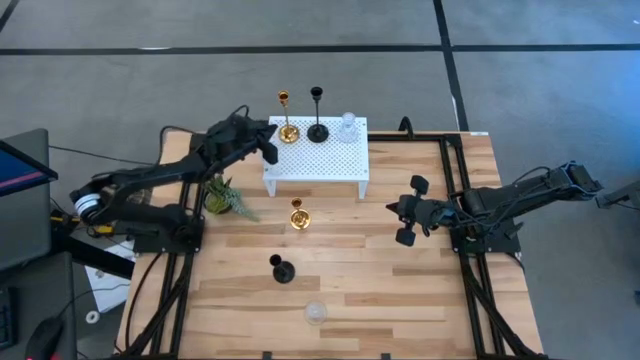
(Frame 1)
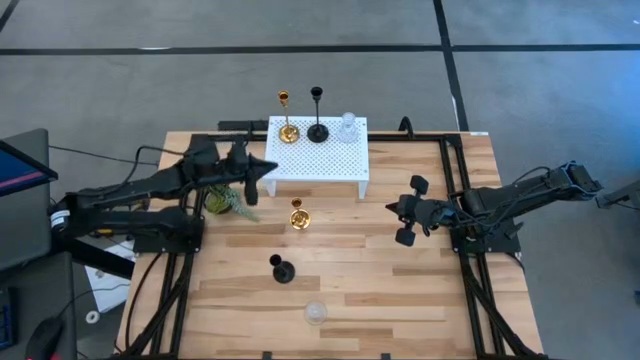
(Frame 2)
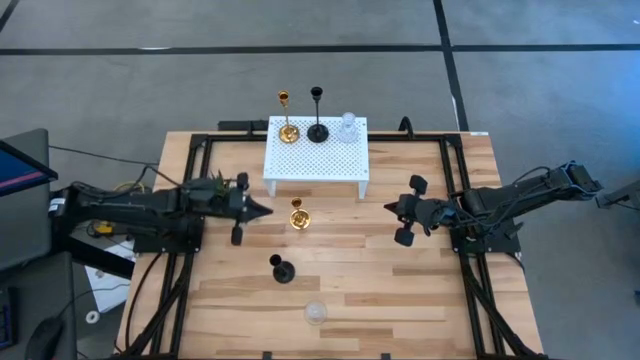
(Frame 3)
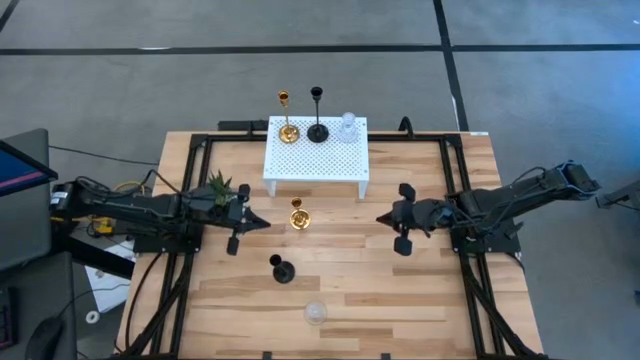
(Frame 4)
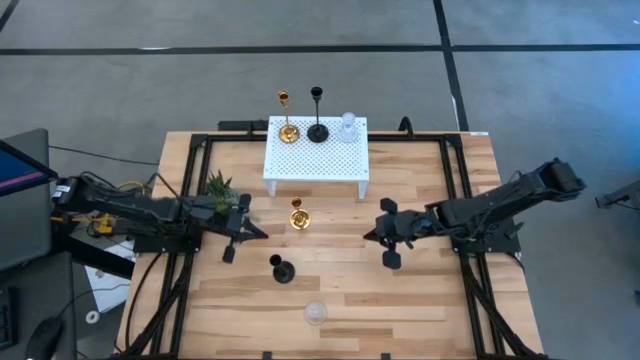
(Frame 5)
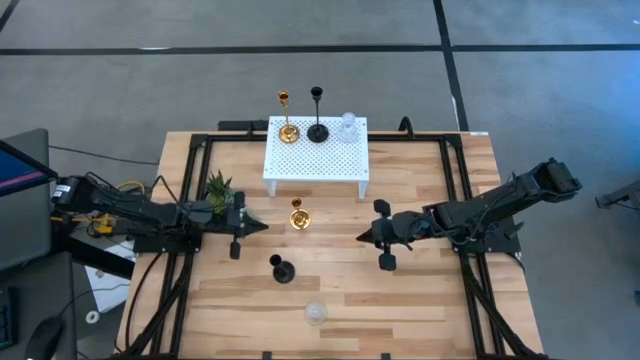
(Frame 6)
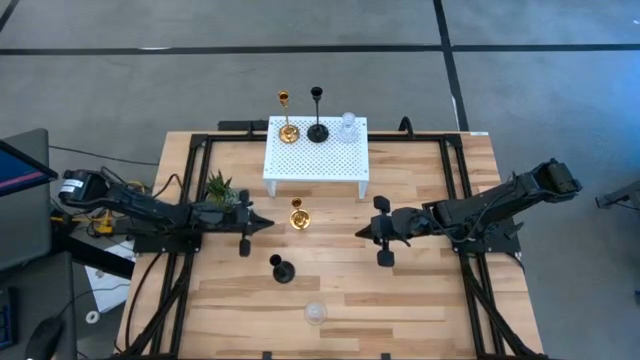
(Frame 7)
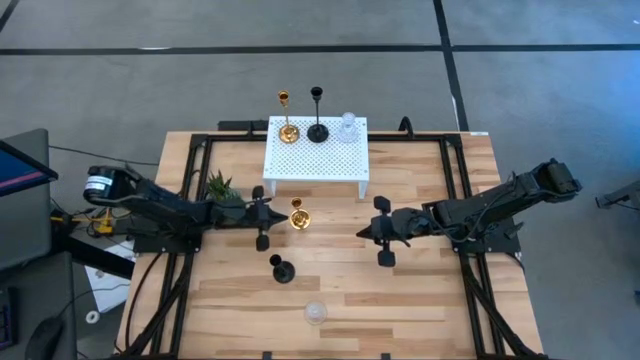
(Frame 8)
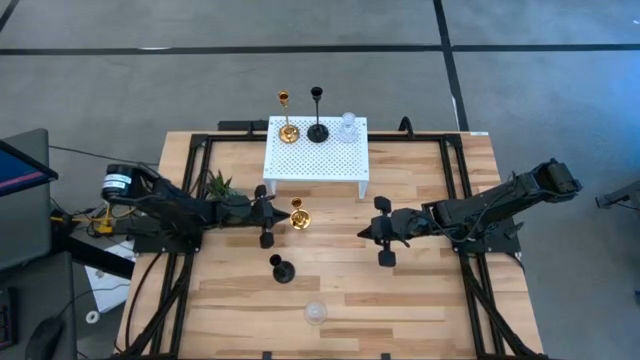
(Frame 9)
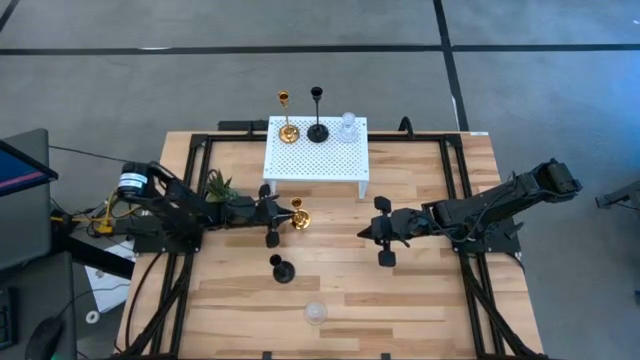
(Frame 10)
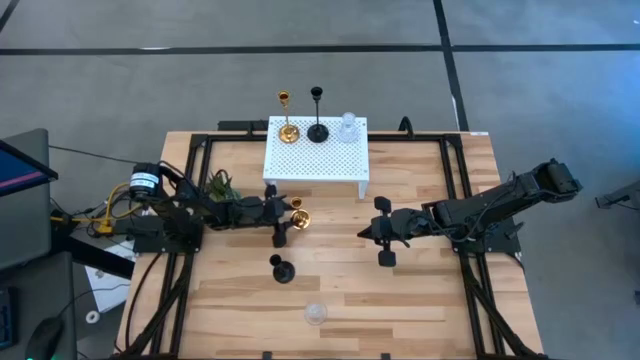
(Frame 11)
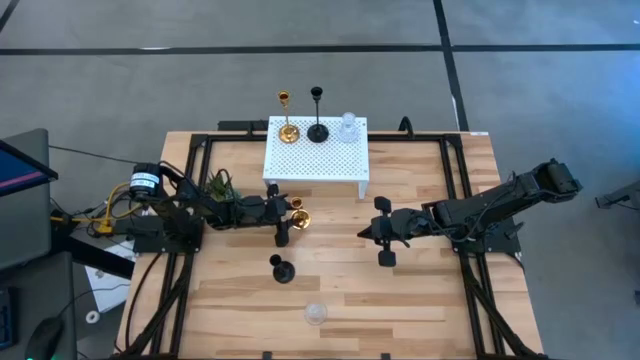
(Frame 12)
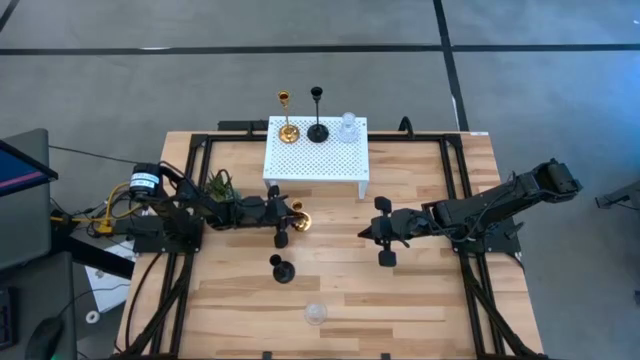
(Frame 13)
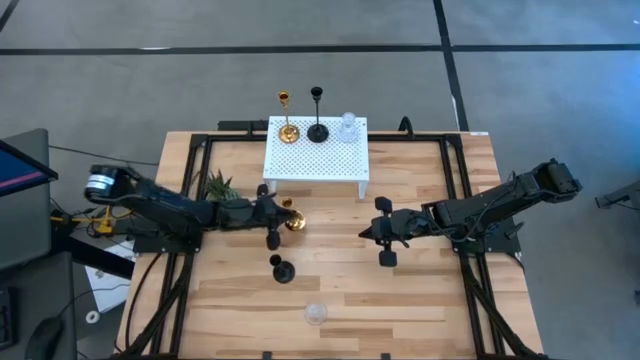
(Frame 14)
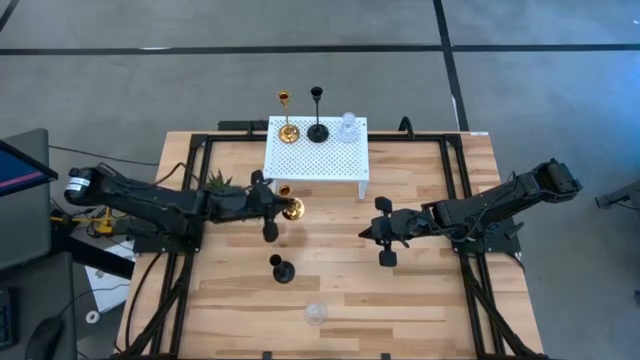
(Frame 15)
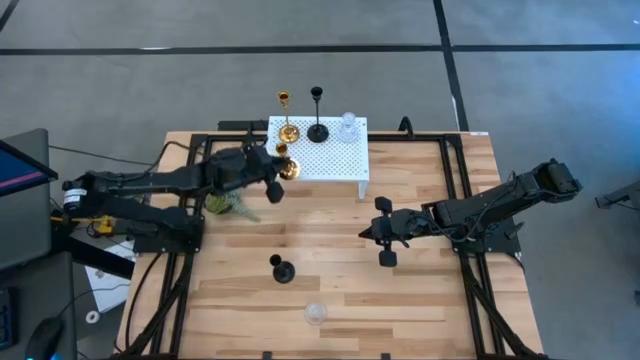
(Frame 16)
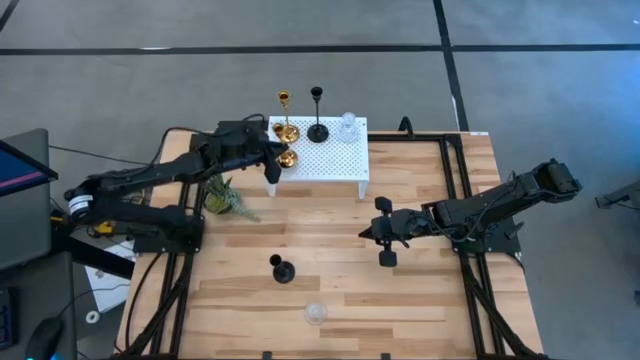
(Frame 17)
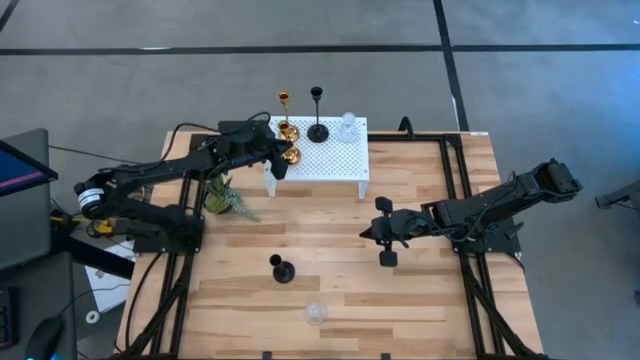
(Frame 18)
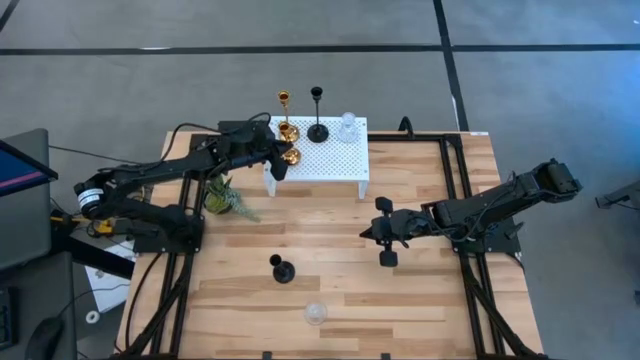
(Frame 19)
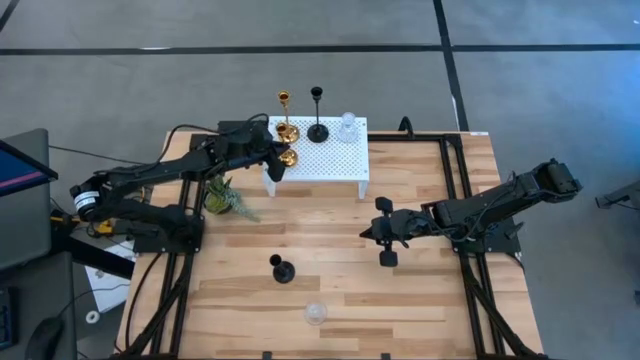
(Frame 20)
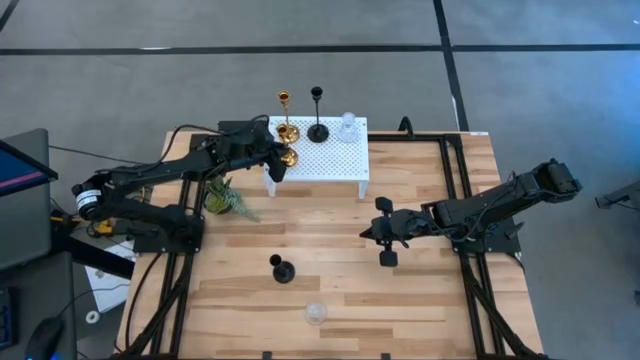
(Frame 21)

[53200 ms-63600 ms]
Task: Pick & Place candle stick holders
Put the gold metal candle stand on the shelf

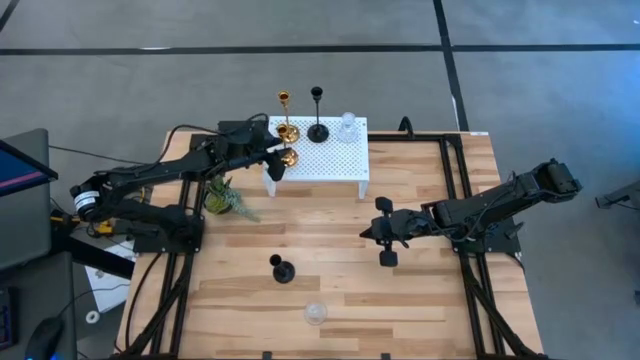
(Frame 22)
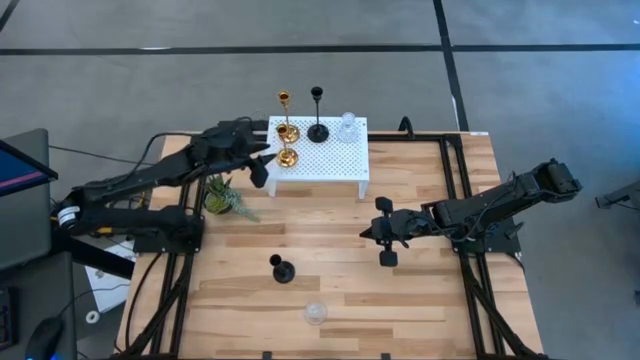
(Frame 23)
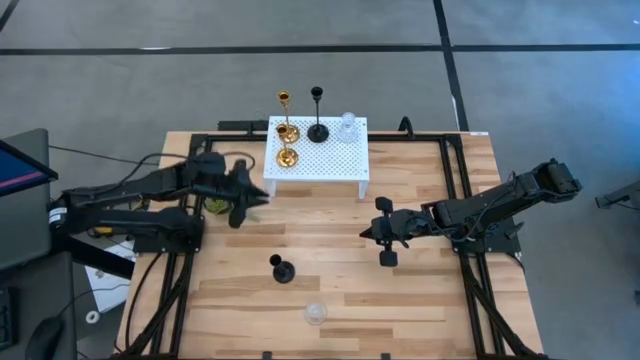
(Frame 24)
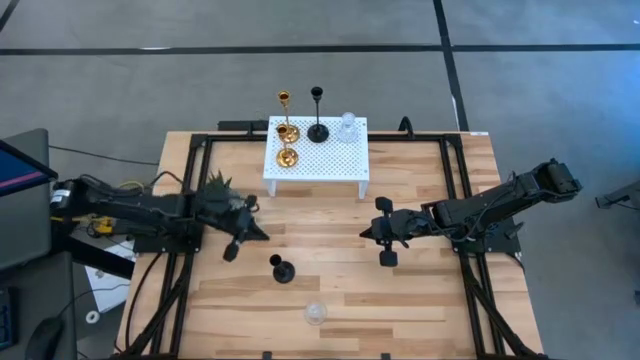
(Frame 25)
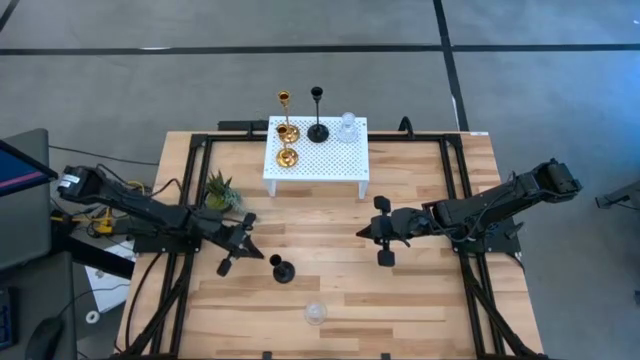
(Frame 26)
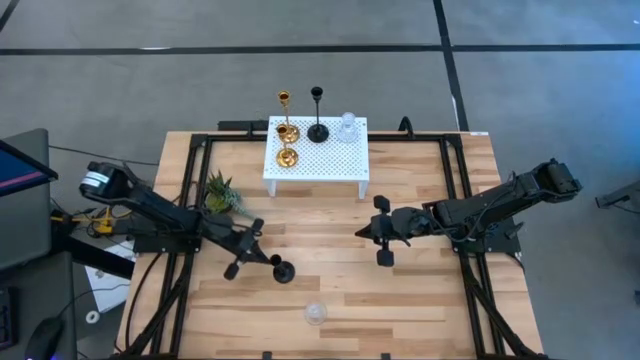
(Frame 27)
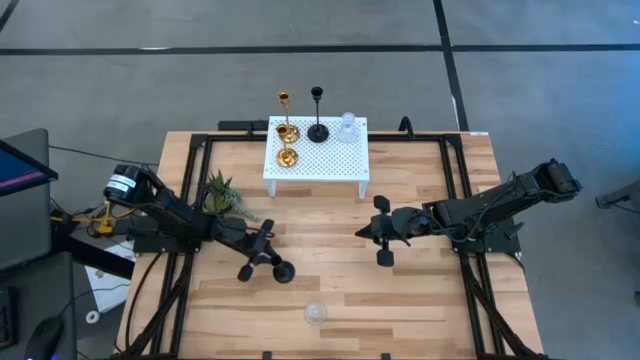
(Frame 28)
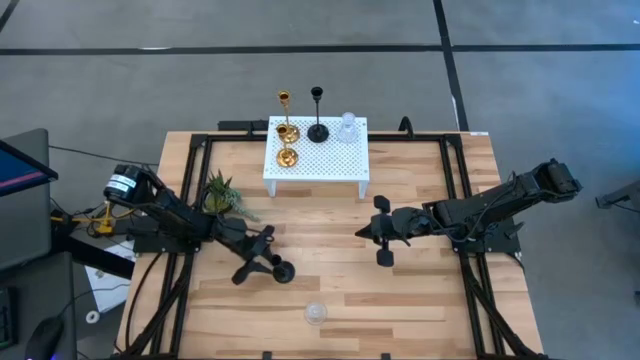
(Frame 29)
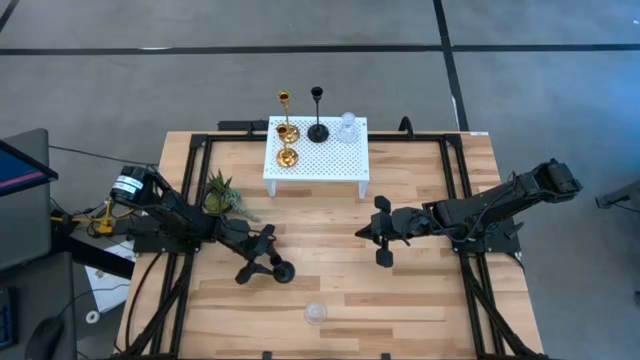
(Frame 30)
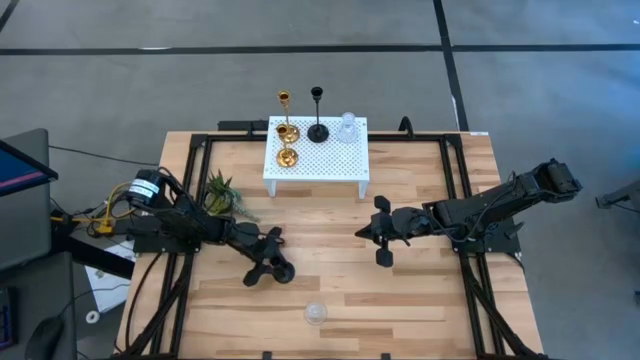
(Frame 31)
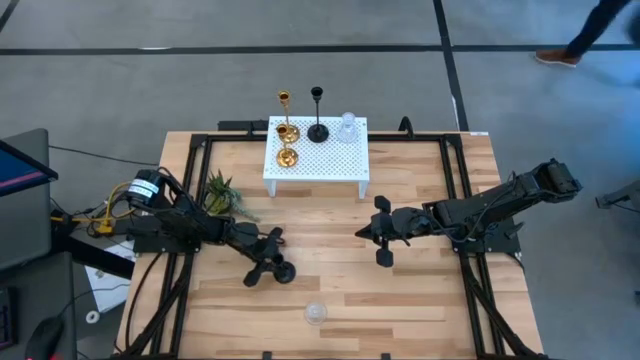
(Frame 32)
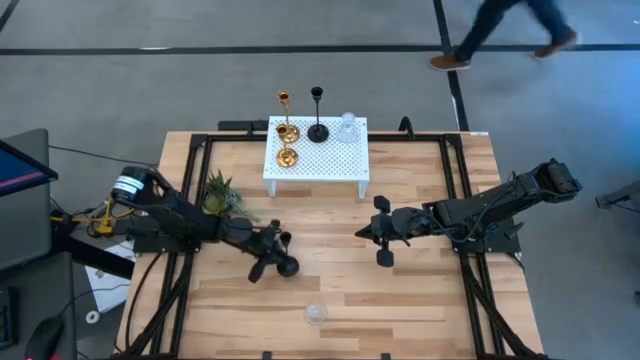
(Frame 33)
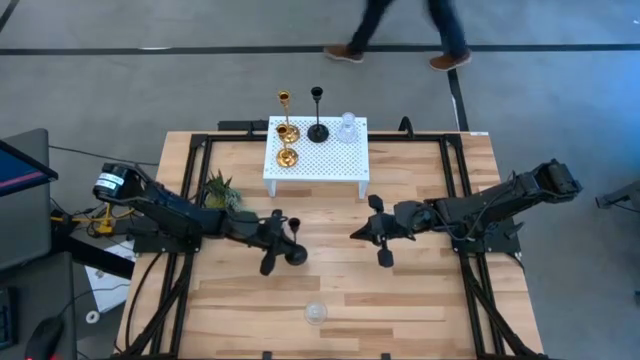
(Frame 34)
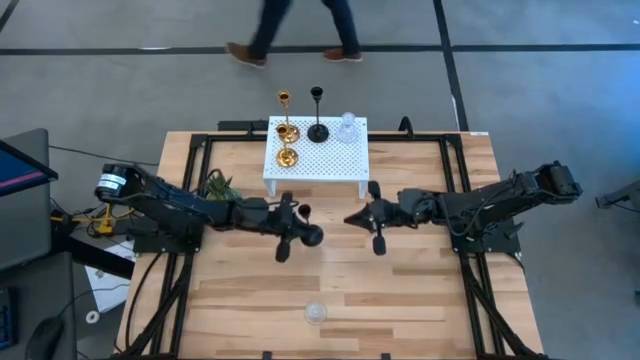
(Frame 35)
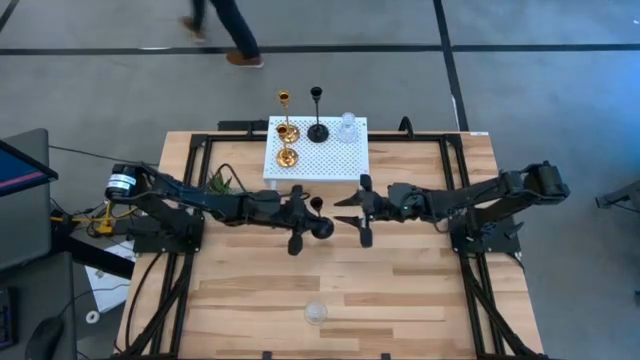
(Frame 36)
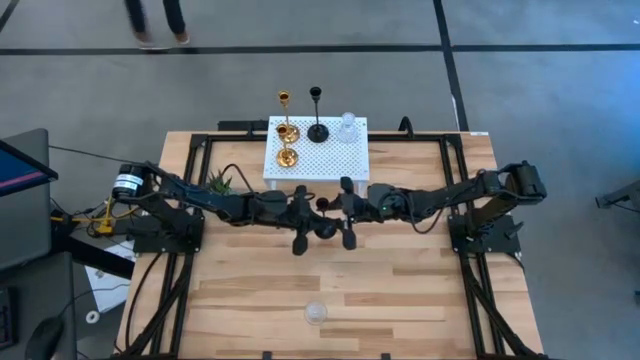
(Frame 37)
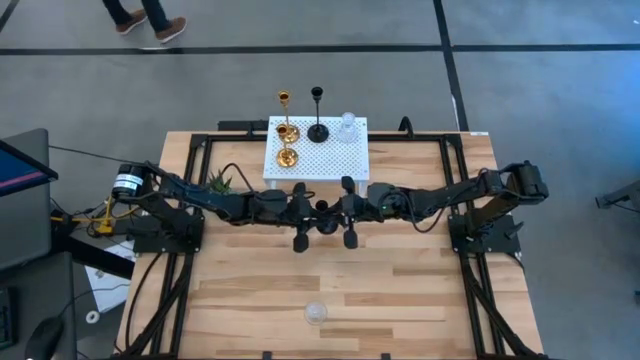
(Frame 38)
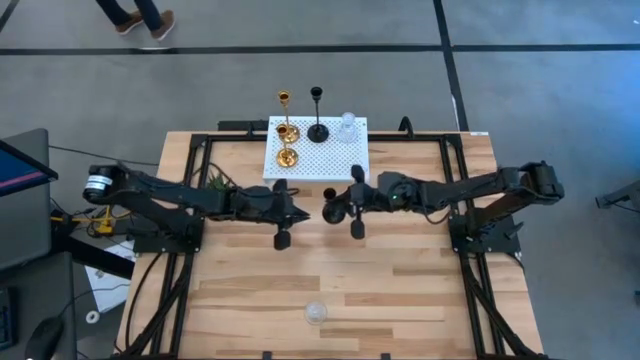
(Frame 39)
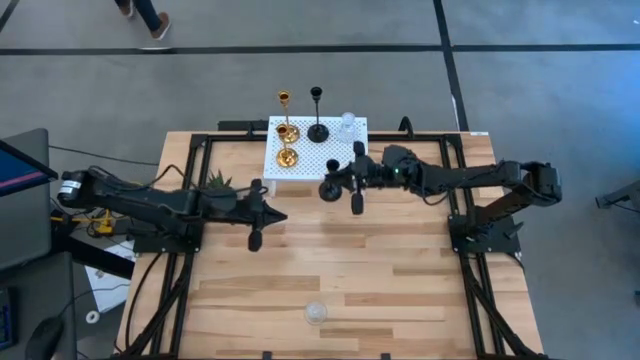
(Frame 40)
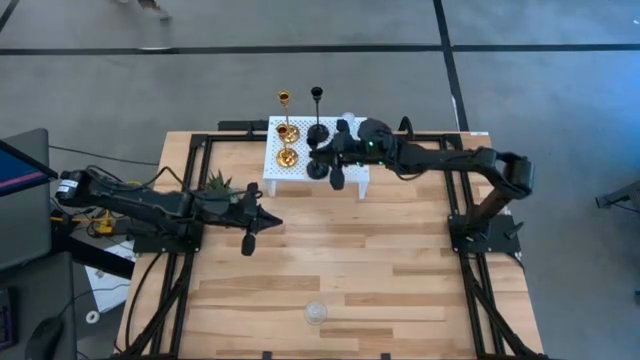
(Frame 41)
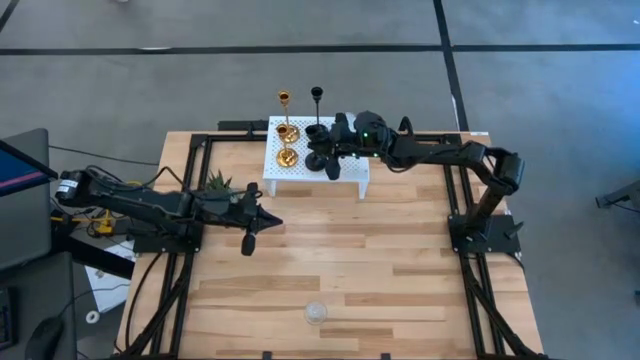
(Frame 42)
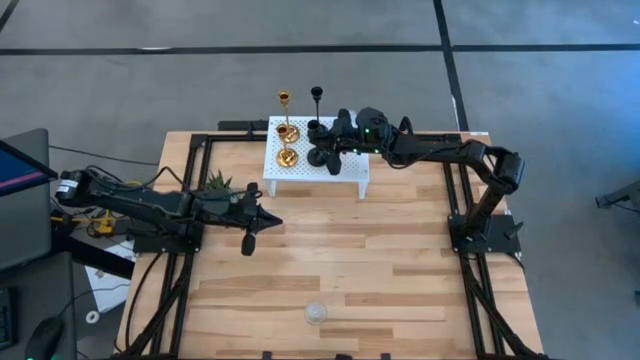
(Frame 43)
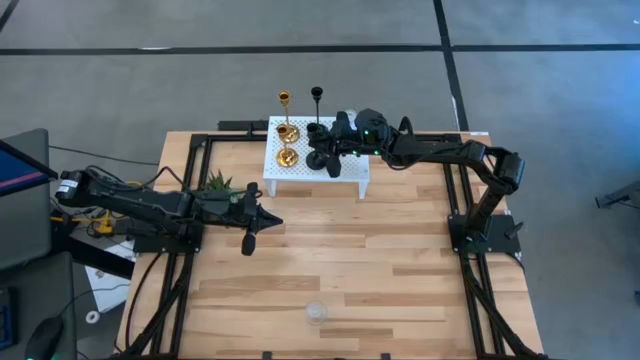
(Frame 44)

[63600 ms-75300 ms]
Put the black metal candle stand on the shelf
